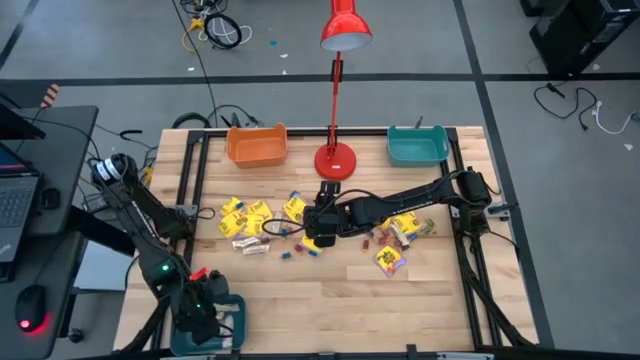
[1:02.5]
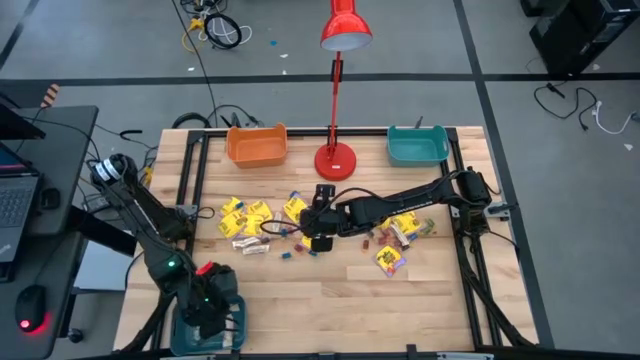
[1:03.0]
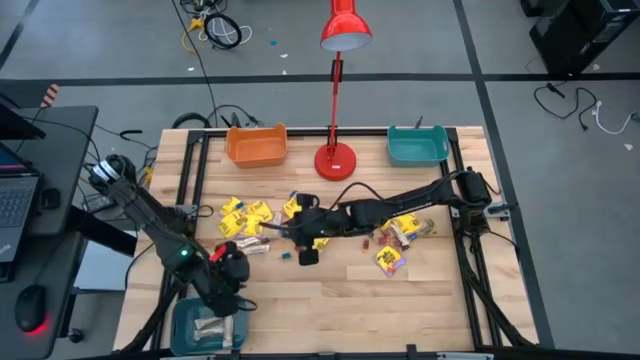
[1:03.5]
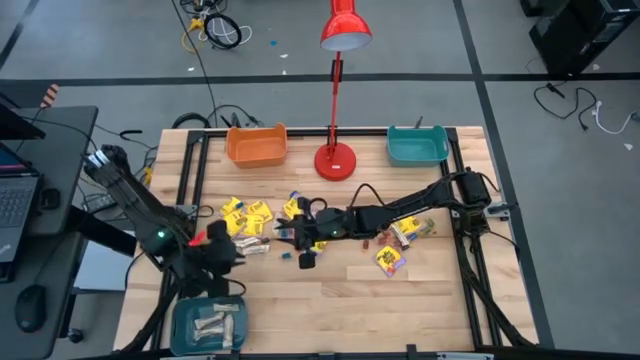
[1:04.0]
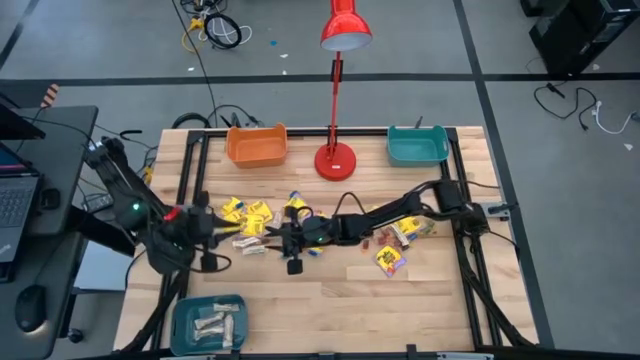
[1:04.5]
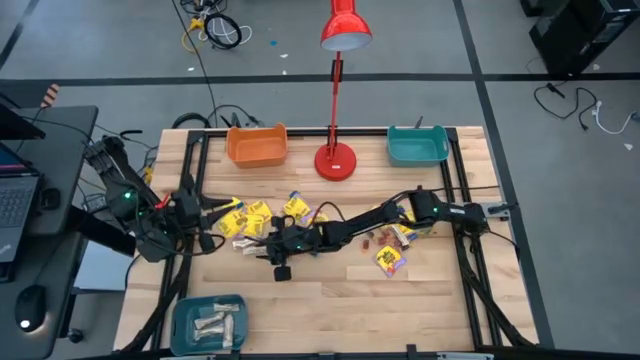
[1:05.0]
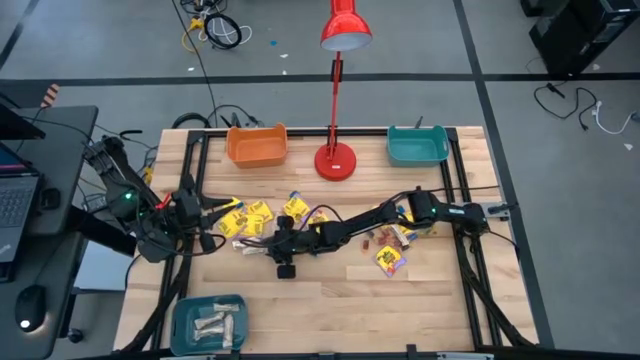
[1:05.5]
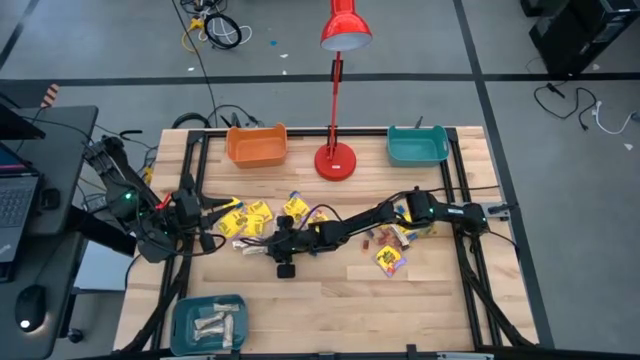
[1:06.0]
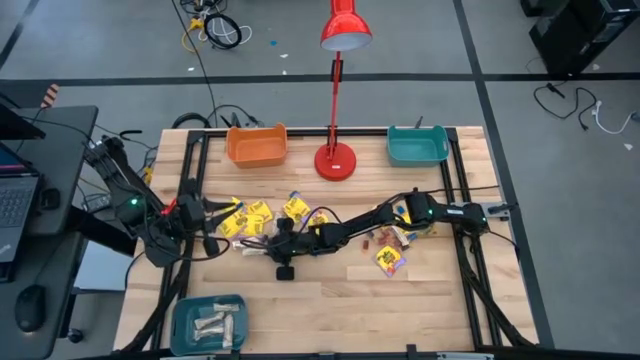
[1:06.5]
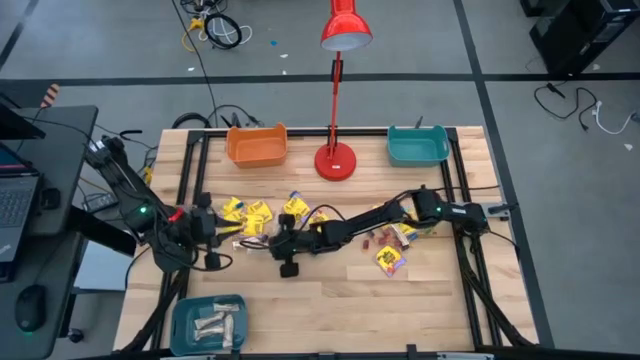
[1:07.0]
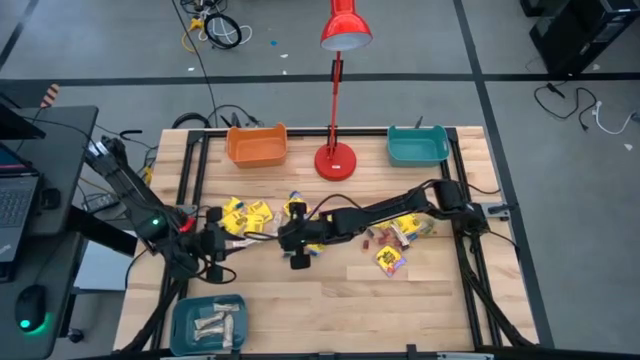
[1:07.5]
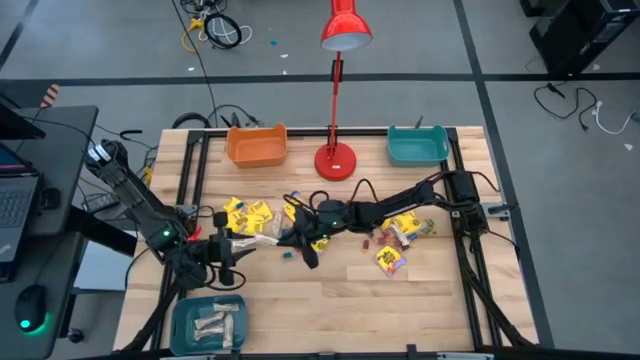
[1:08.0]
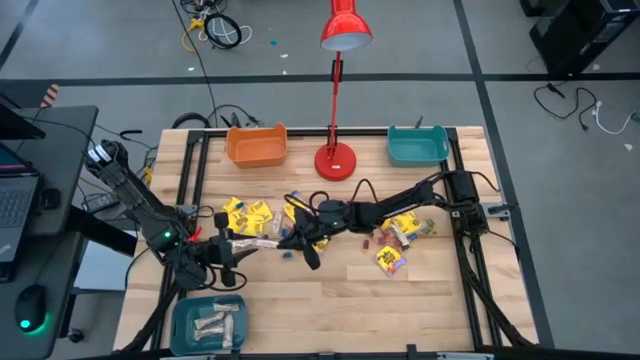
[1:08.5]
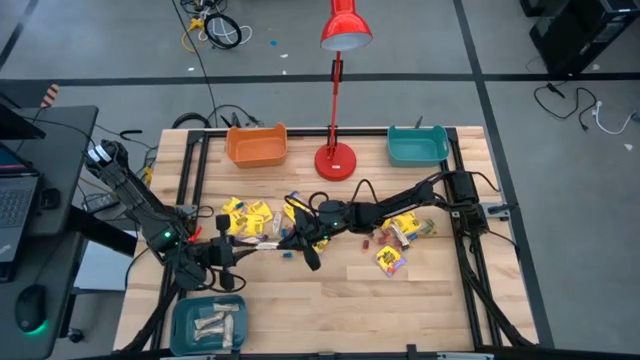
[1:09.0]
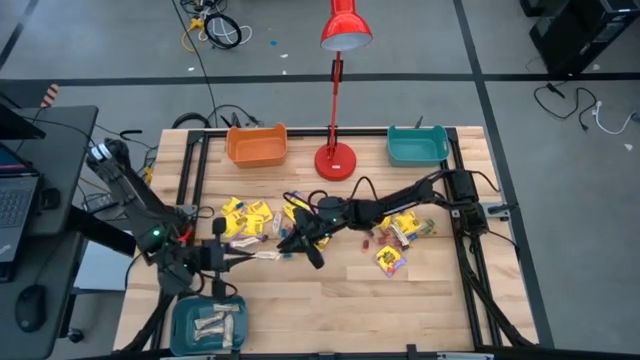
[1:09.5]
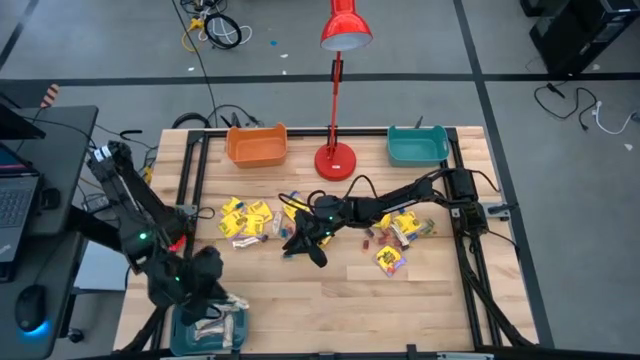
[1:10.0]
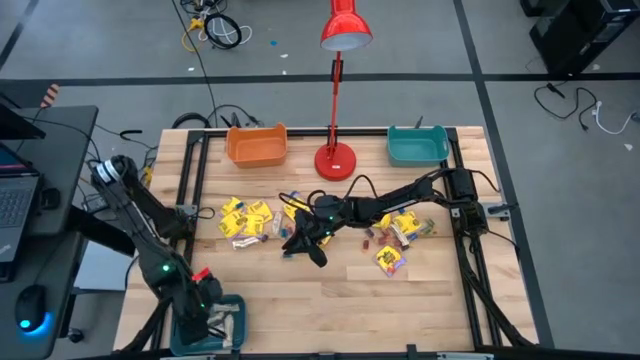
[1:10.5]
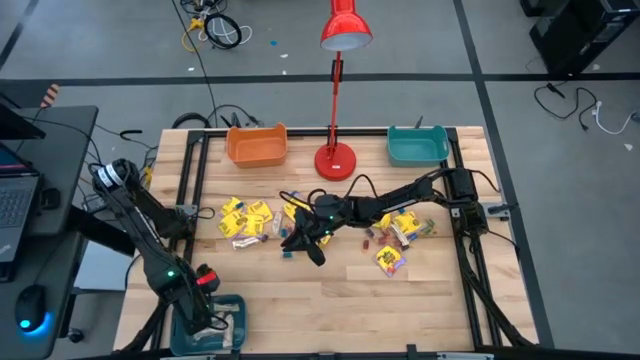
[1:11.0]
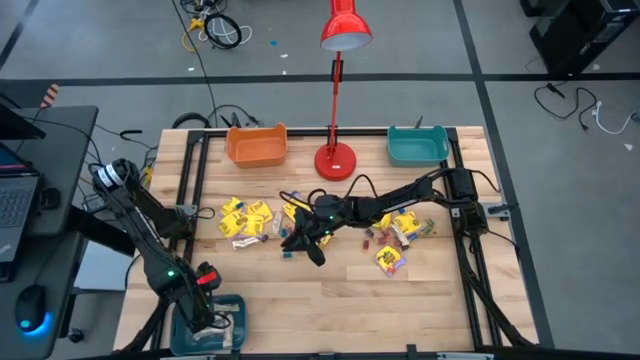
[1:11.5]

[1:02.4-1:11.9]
Task: Sort candy
Put the white candy into the blue bin

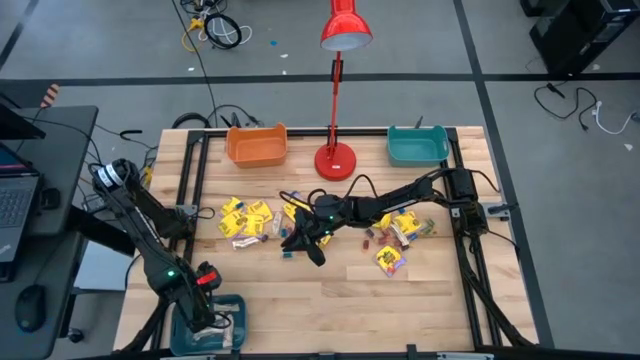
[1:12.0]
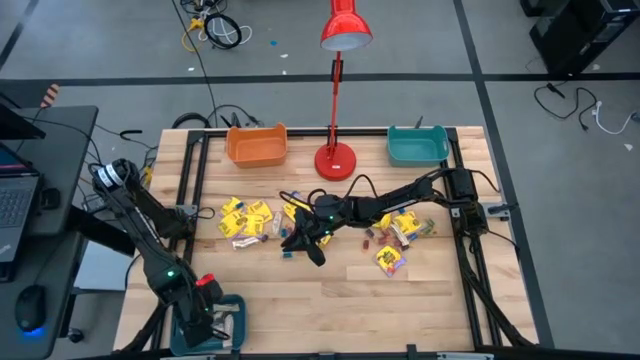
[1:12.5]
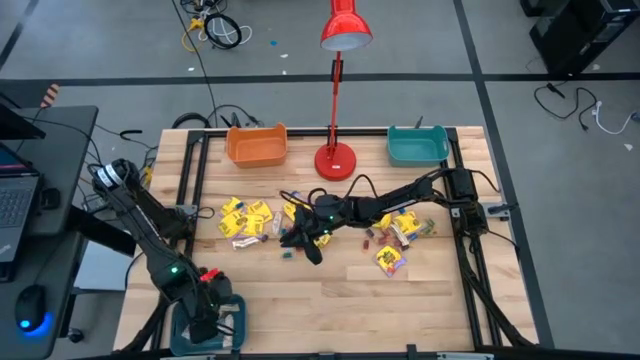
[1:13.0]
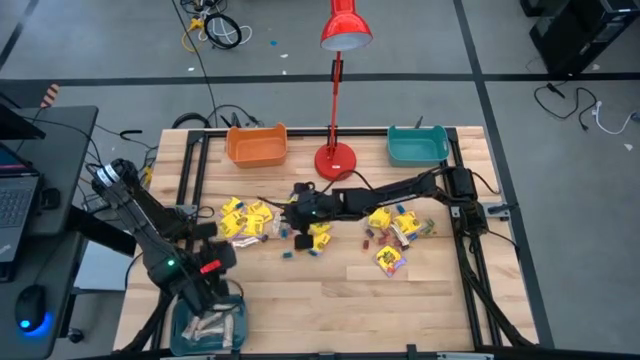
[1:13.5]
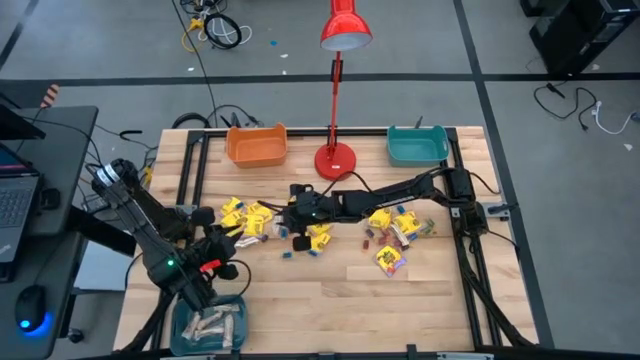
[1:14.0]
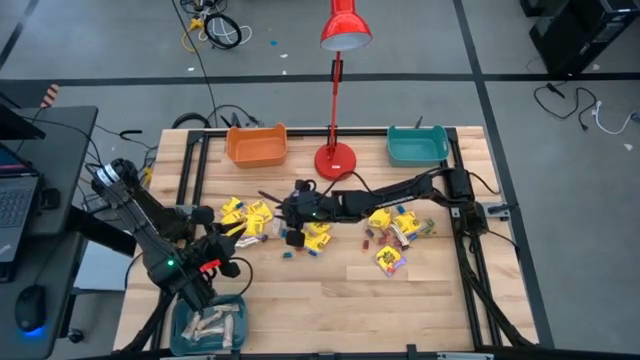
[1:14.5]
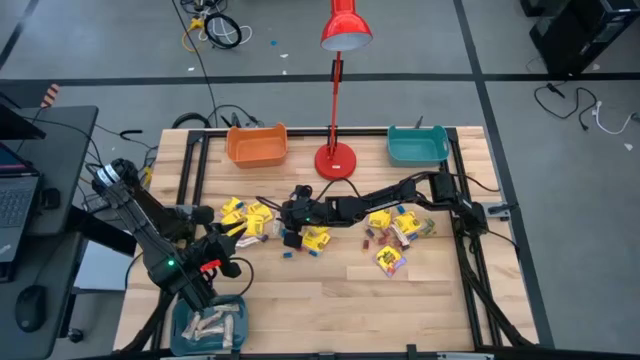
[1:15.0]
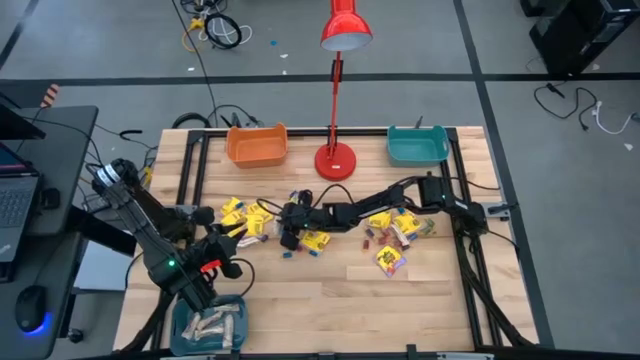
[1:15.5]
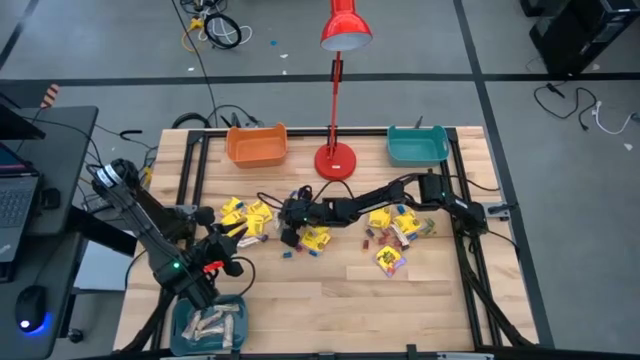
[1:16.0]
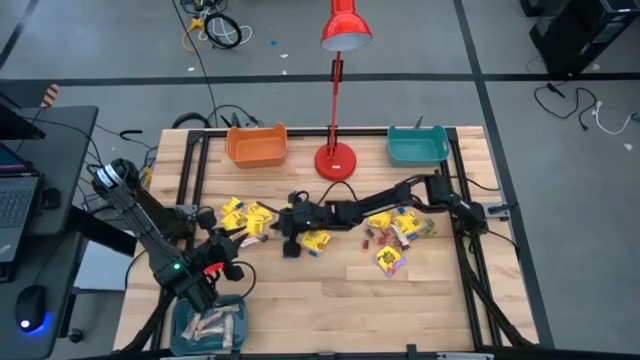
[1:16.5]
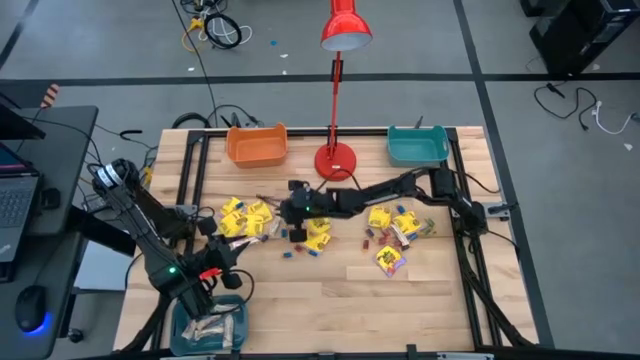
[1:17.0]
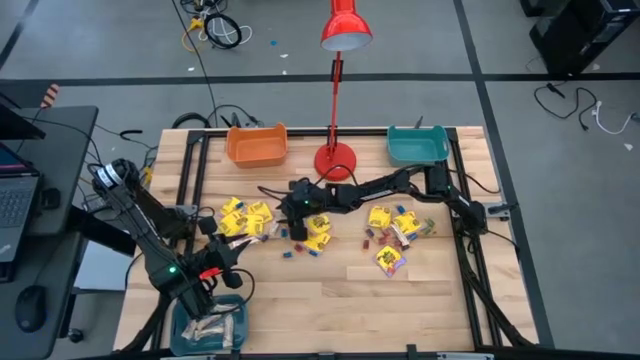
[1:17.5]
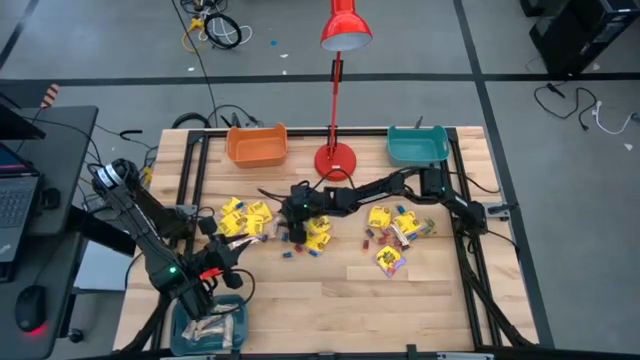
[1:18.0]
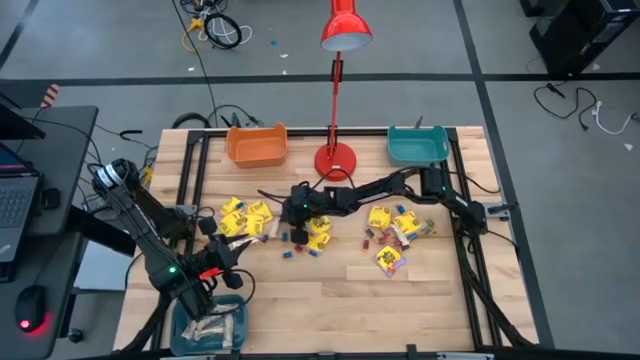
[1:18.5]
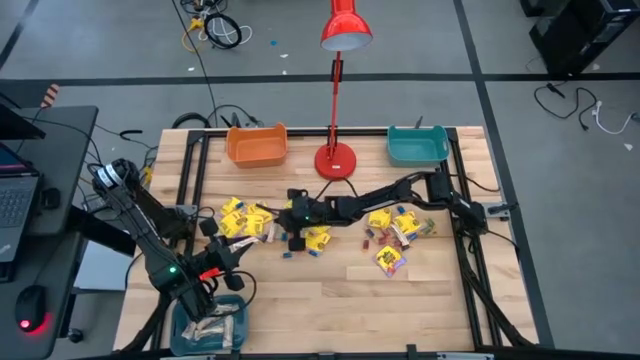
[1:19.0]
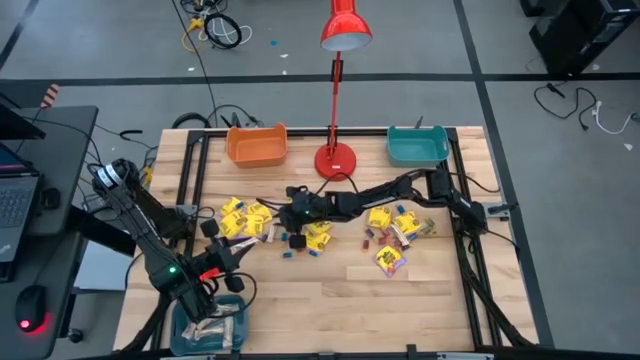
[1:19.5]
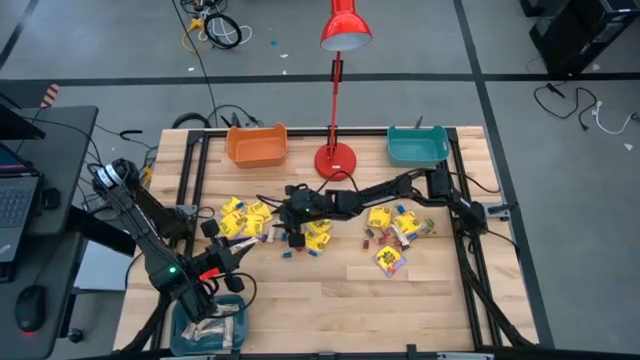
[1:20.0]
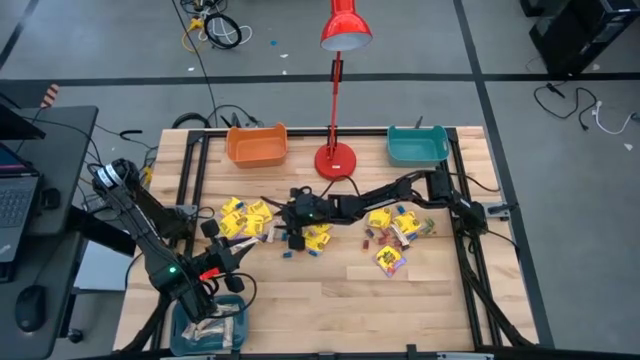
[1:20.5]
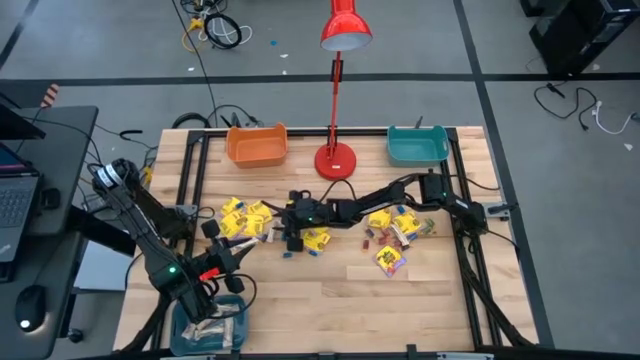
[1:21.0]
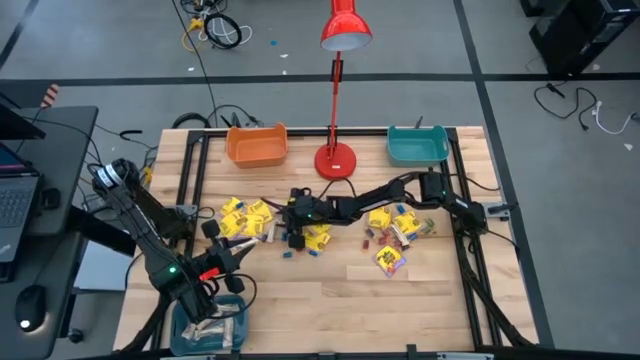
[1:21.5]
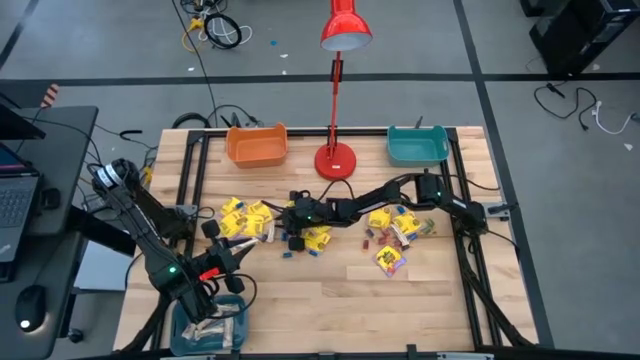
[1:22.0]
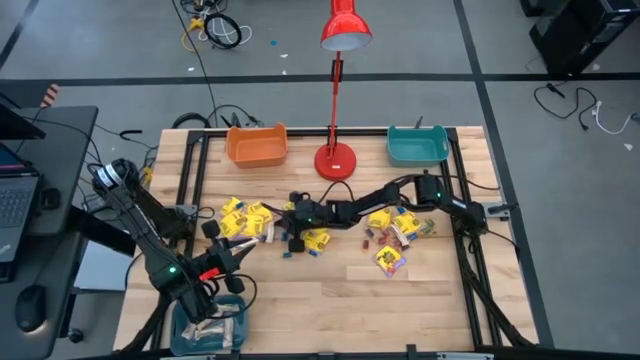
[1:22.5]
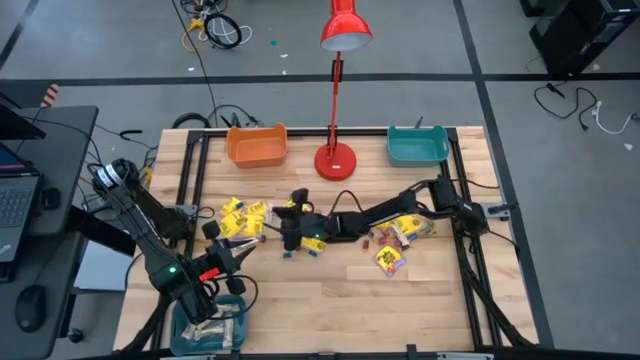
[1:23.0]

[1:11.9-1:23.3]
Put the white candy into the blue bin
